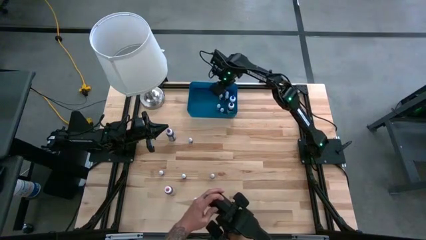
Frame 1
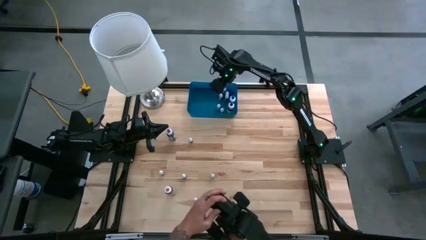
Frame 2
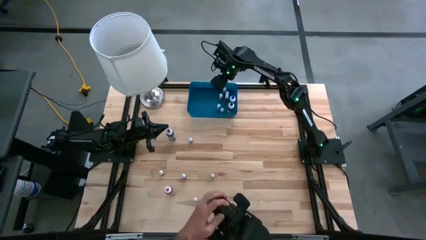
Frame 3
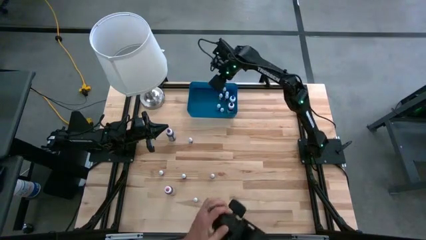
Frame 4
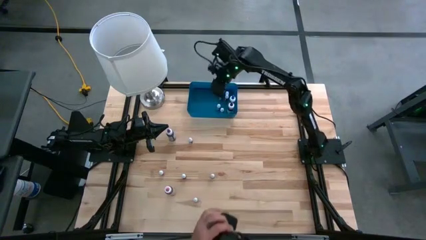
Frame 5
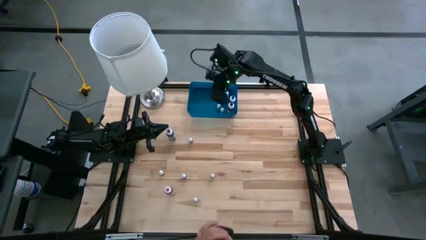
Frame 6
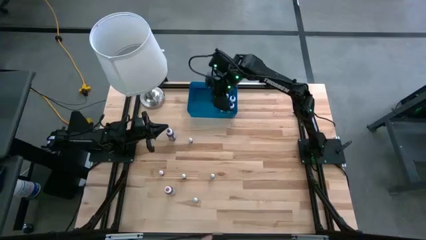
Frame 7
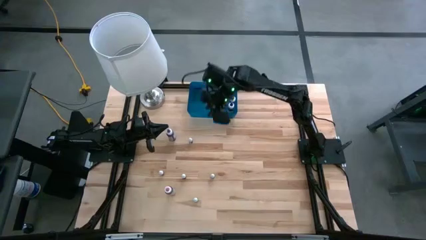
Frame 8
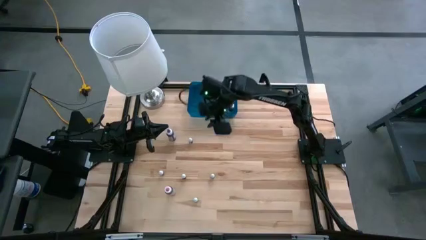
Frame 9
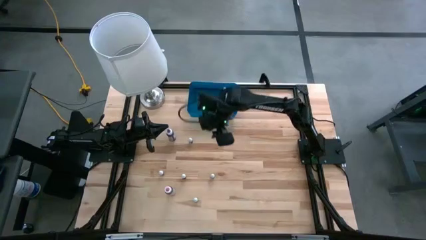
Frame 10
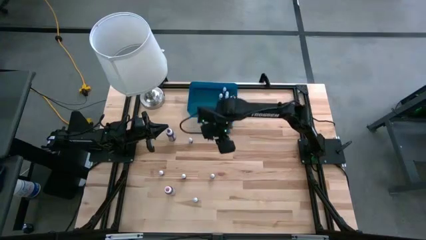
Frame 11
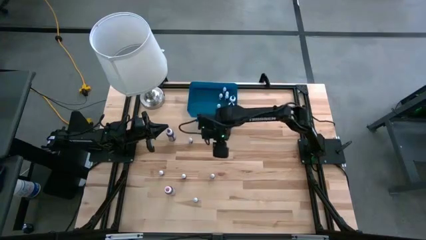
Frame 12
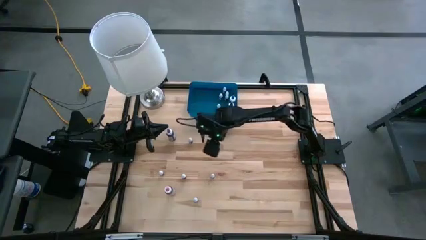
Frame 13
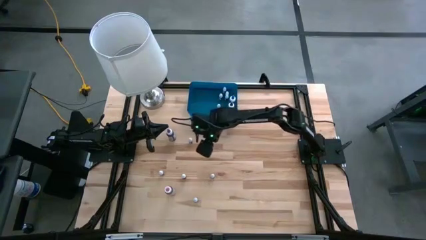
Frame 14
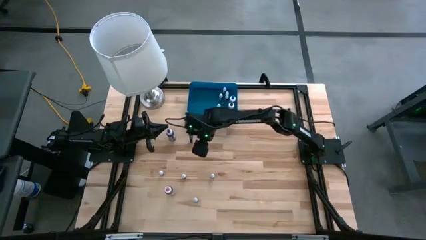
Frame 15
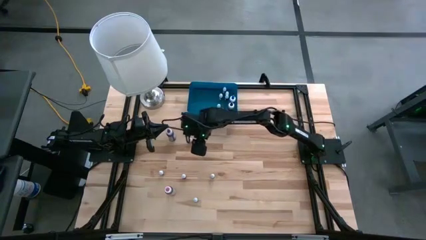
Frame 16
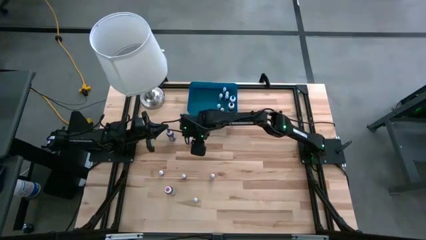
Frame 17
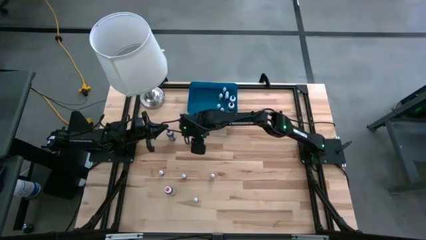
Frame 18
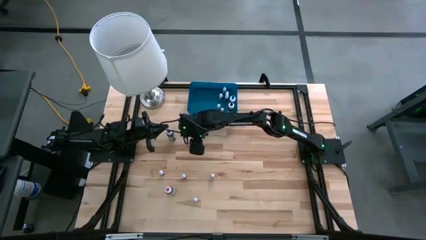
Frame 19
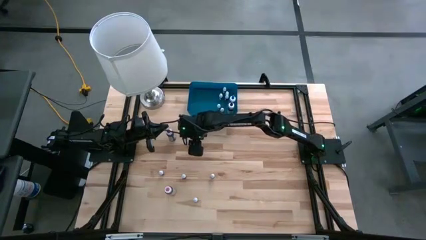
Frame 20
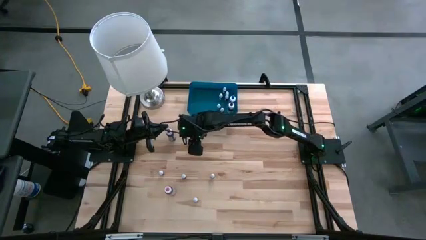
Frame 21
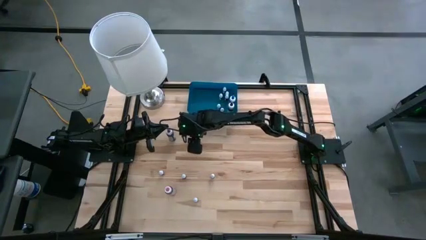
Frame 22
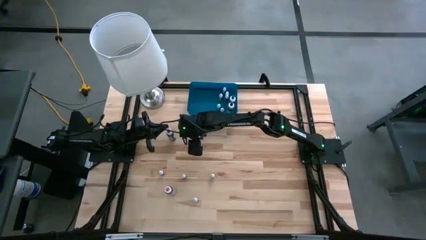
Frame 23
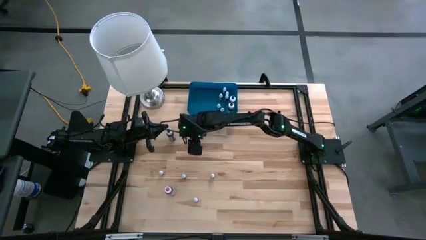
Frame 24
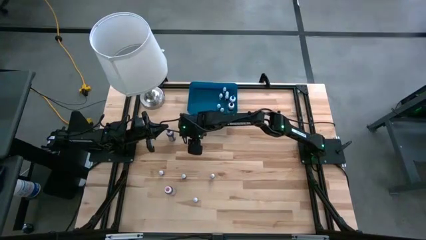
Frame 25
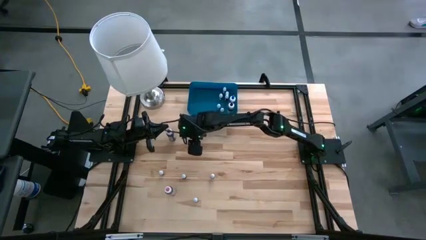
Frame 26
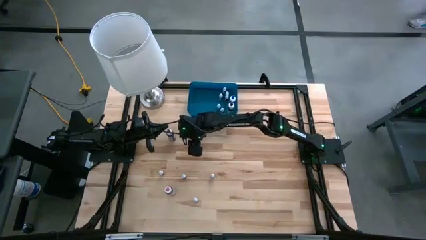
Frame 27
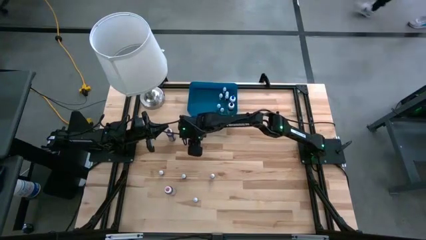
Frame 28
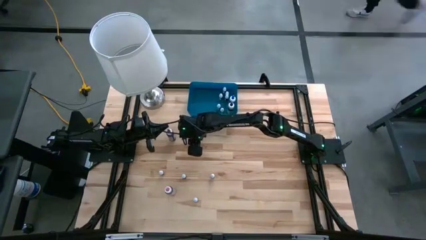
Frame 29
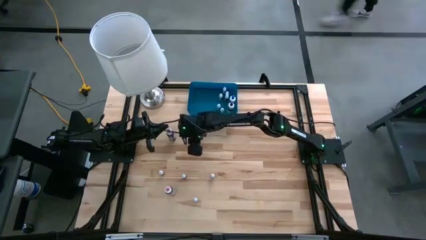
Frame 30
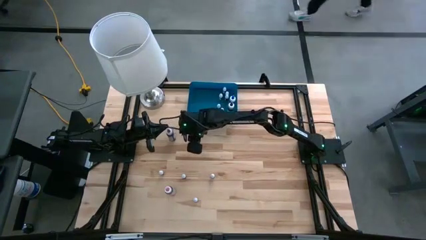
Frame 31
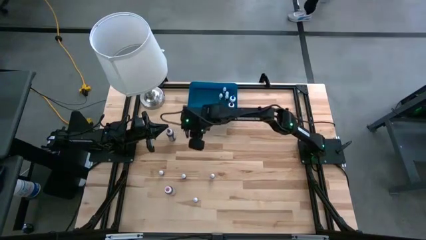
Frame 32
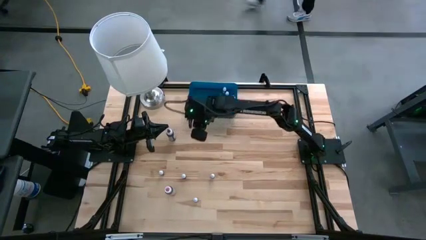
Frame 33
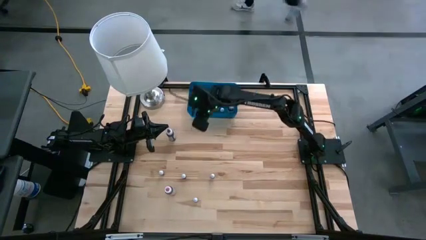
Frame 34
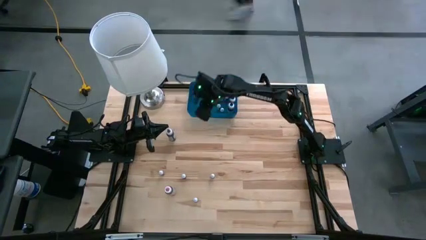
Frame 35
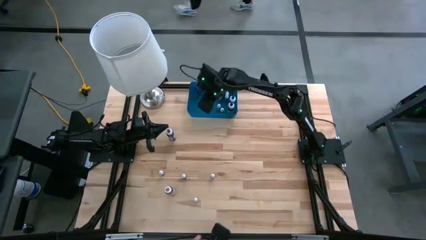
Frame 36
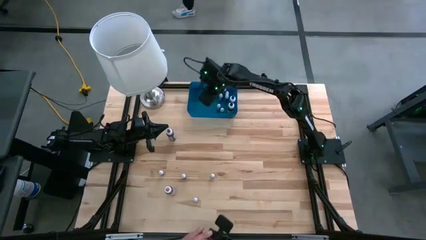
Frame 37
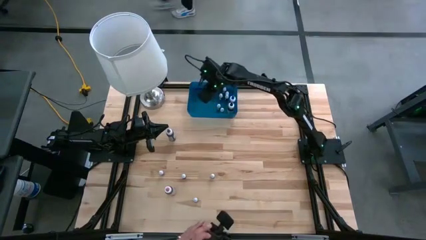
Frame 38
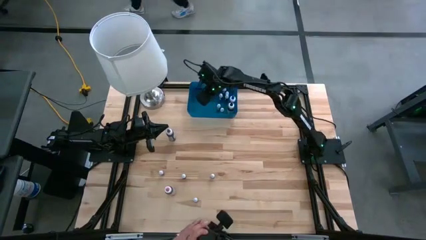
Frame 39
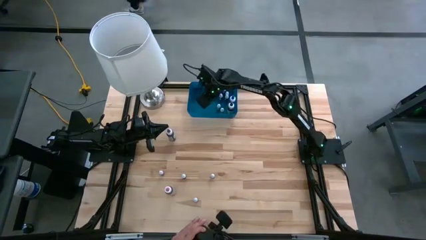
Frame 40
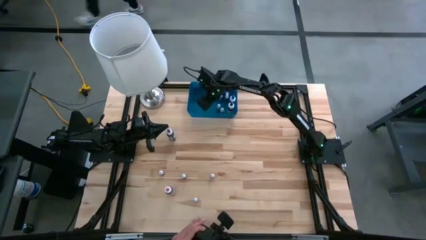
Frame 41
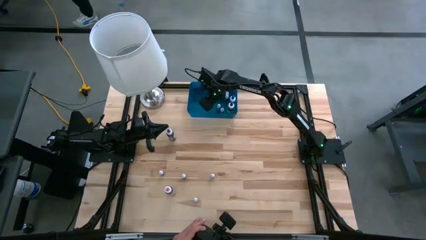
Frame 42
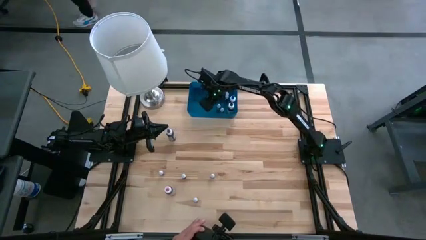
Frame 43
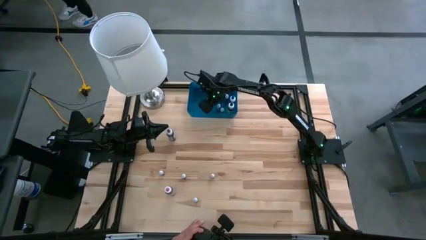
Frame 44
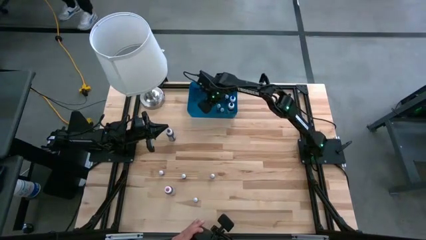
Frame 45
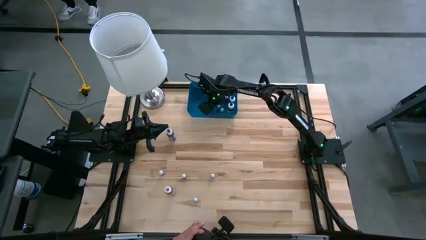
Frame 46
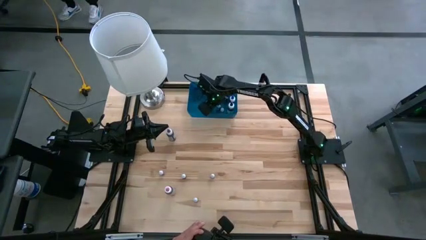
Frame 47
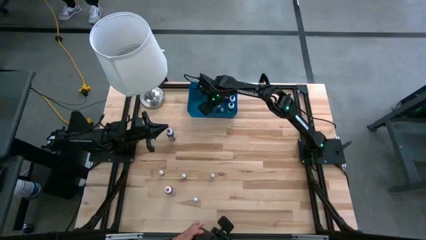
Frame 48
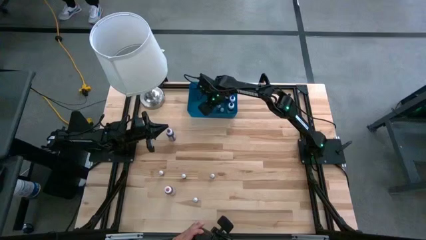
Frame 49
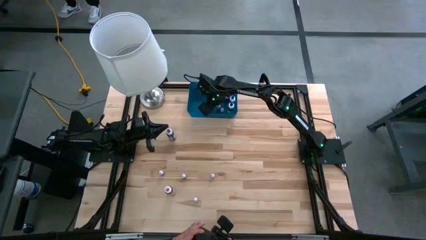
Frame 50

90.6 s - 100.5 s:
Task: Pick & Place food coloring
Put the small light blue food coloring bottle into the blue bin

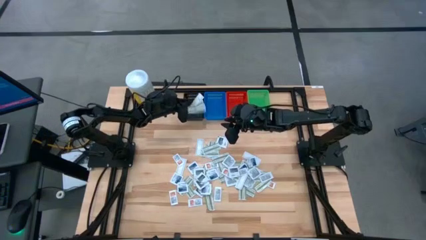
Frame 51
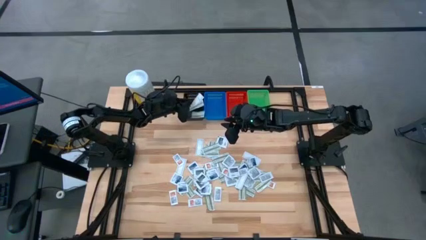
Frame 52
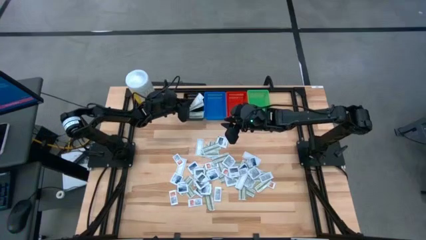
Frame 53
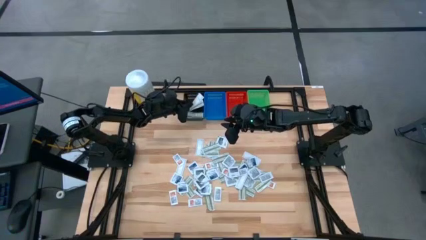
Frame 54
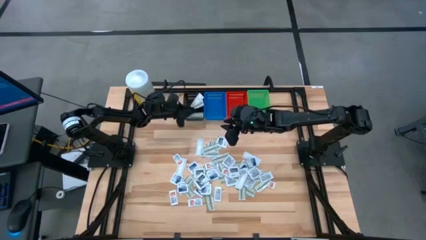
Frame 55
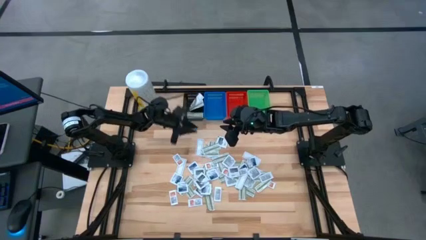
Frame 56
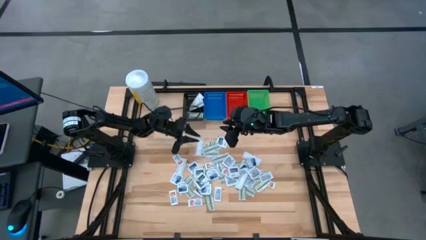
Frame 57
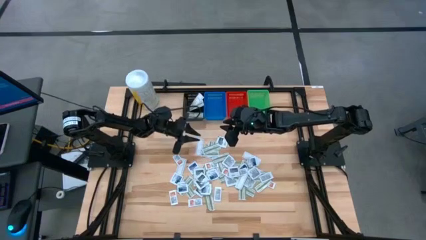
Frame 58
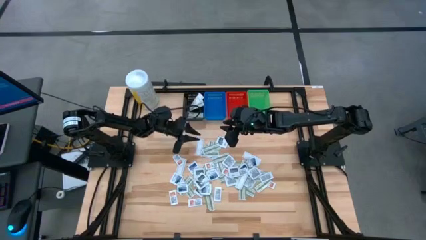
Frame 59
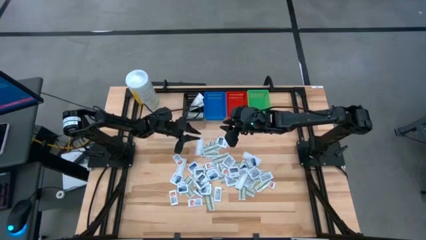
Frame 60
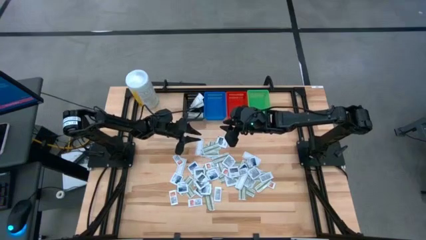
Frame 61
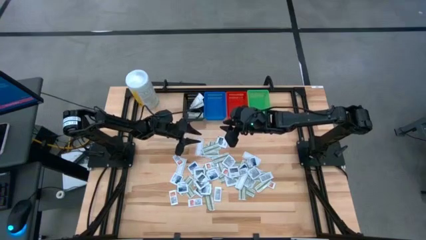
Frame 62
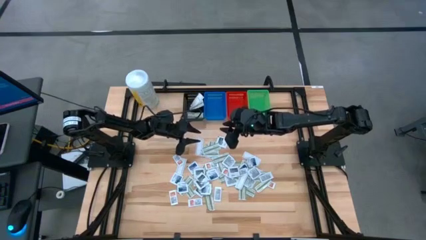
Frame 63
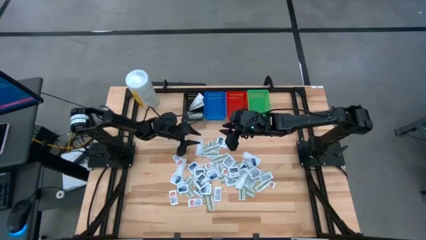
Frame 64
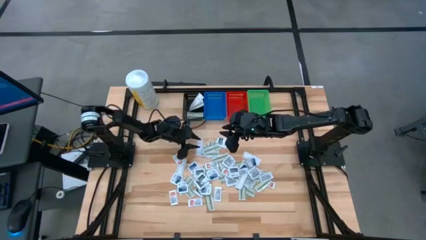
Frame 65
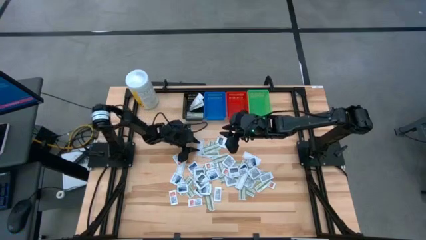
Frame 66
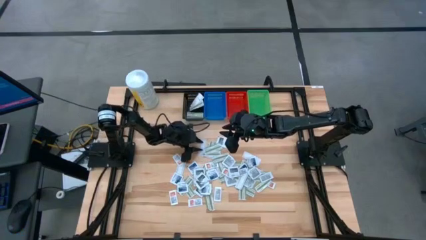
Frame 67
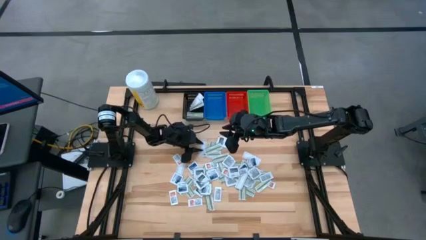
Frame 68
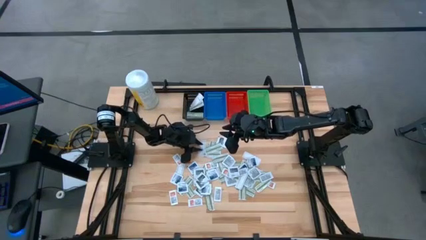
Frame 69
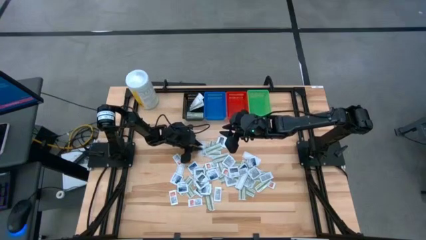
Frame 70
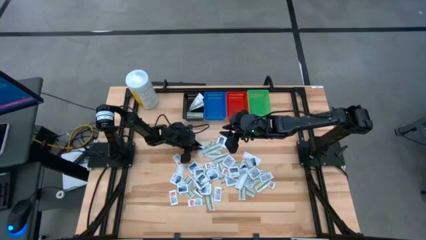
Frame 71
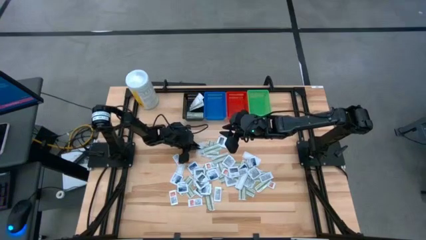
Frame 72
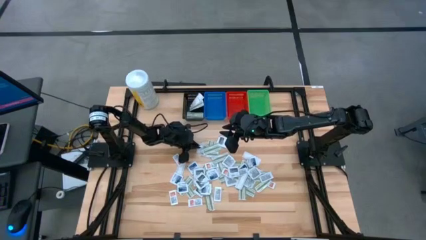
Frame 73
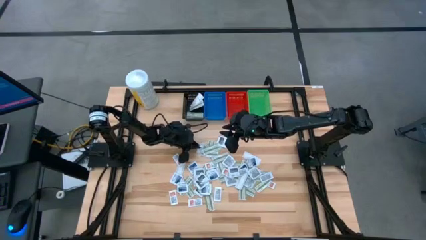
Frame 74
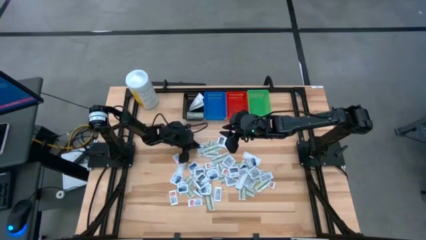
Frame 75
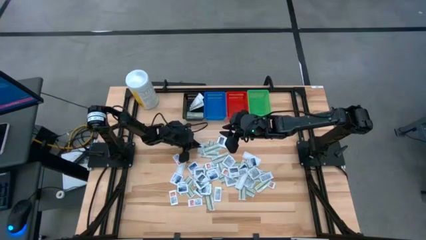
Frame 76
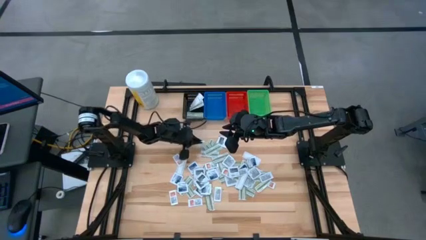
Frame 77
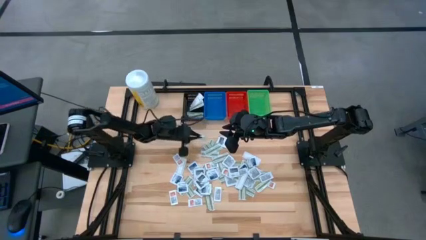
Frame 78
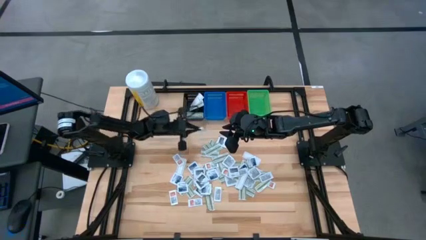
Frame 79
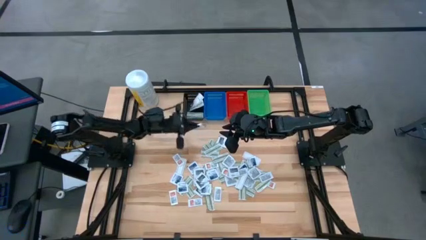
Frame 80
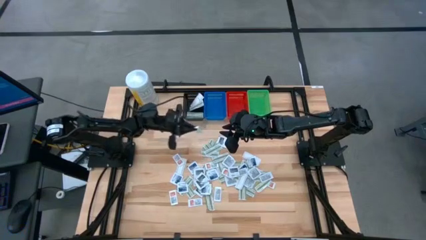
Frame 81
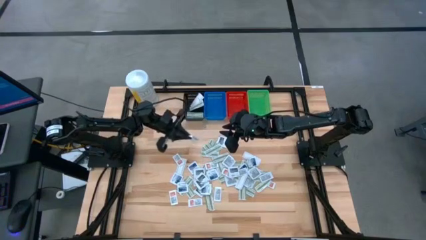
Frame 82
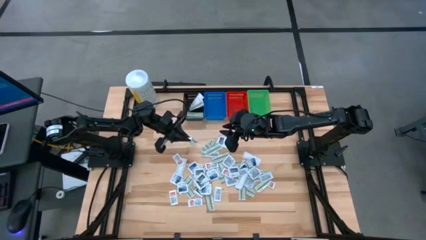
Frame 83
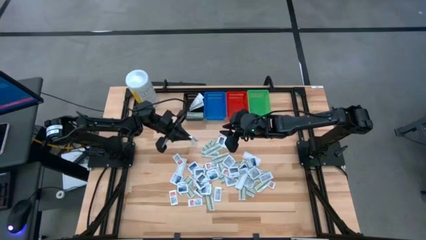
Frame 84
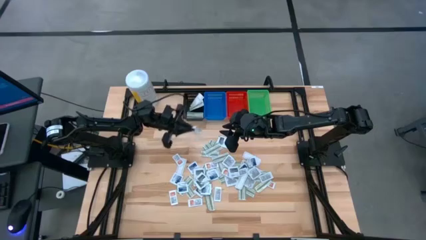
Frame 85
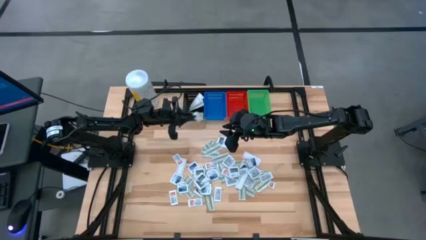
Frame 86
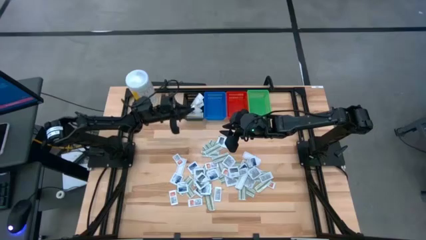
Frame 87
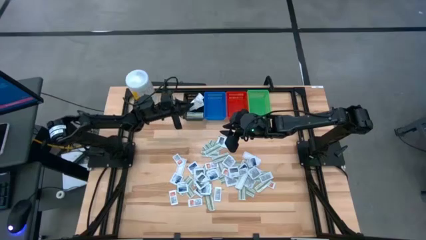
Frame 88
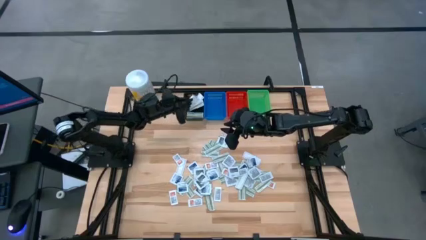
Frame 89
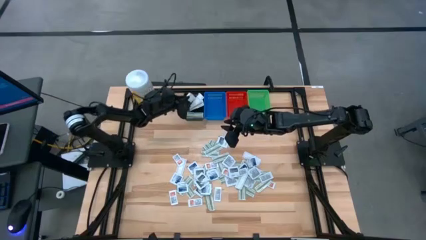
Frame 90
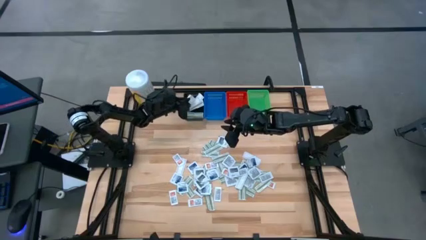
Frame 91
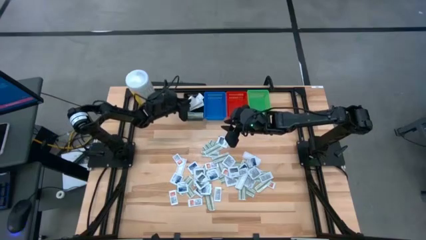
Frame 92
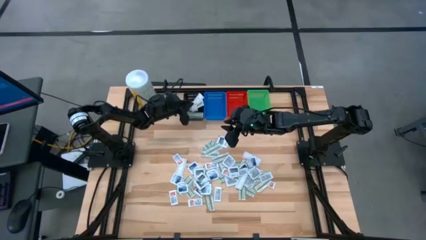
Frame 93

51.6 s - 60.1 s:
Task: Pick & Place First Aid Supplies
Put the green bandage pack in the black bin
